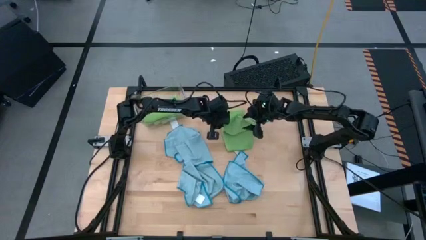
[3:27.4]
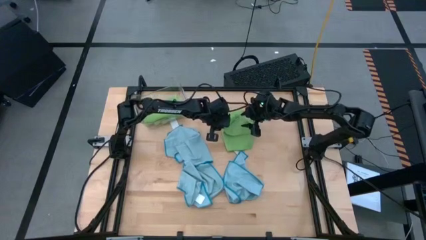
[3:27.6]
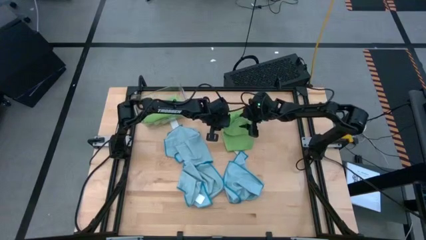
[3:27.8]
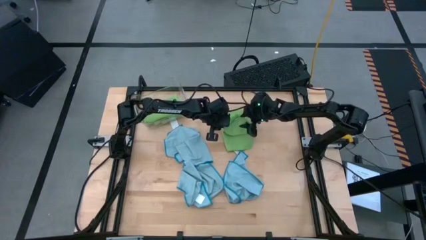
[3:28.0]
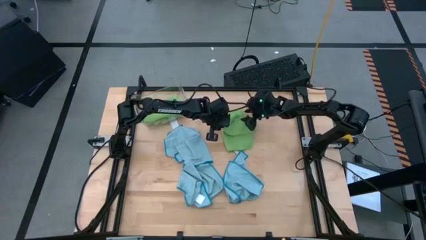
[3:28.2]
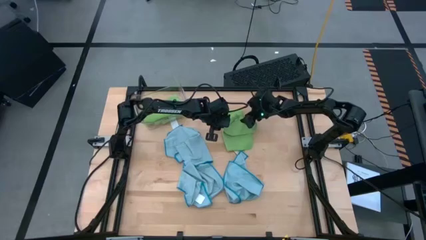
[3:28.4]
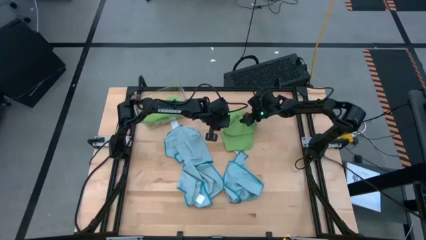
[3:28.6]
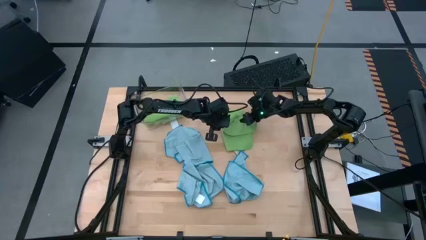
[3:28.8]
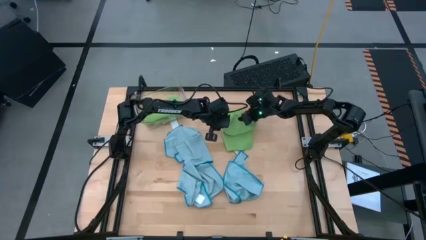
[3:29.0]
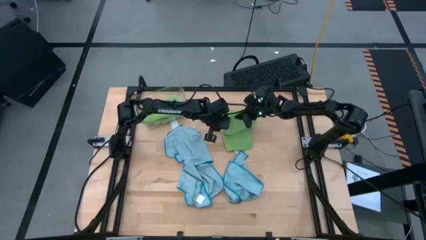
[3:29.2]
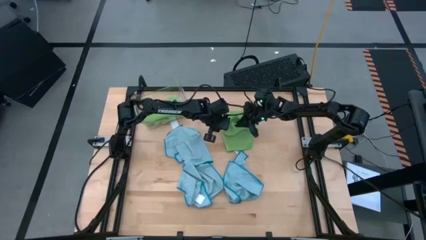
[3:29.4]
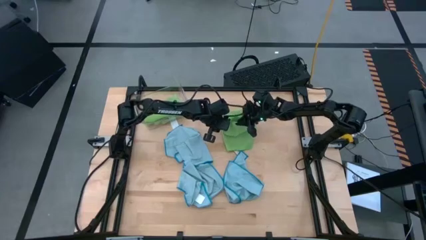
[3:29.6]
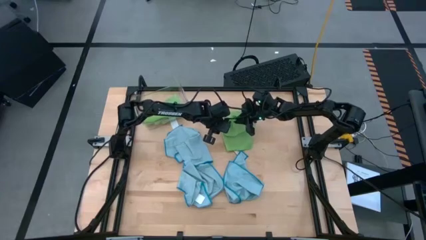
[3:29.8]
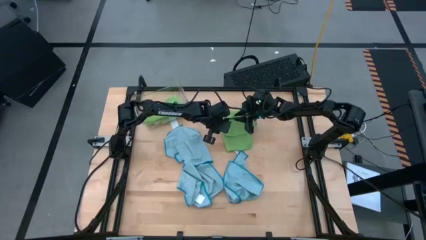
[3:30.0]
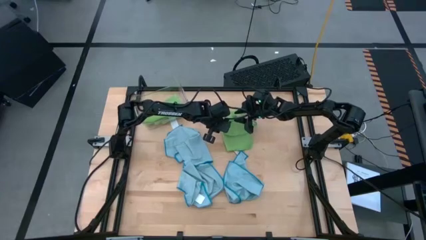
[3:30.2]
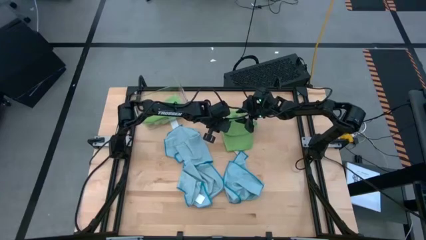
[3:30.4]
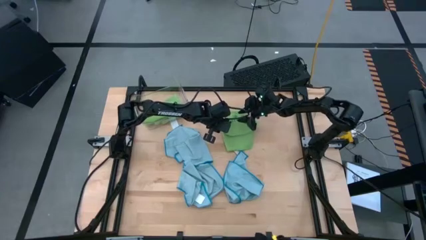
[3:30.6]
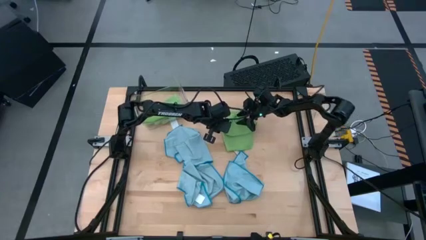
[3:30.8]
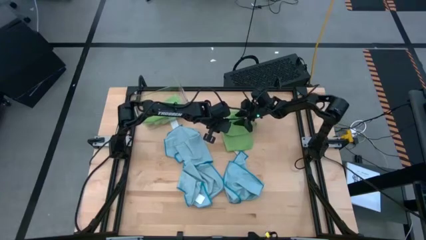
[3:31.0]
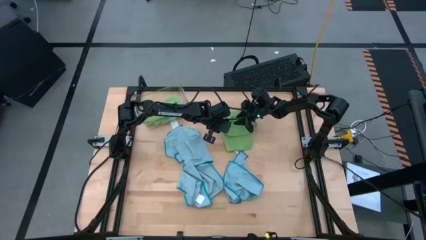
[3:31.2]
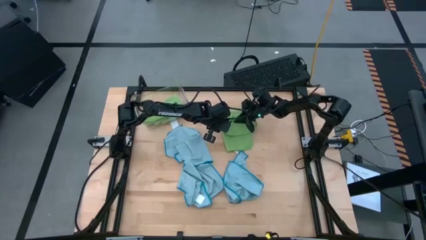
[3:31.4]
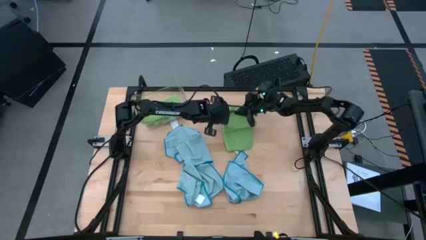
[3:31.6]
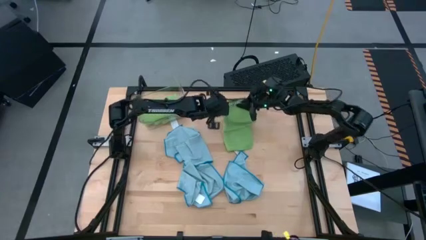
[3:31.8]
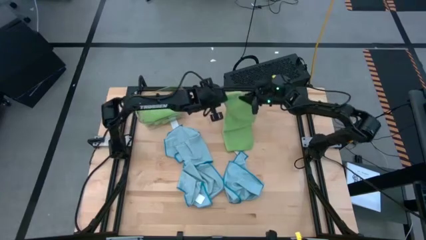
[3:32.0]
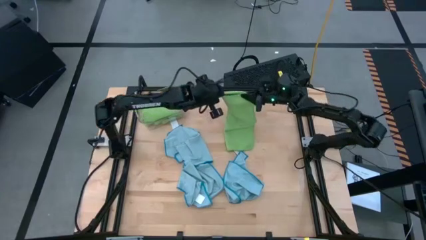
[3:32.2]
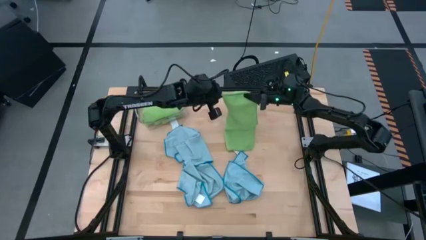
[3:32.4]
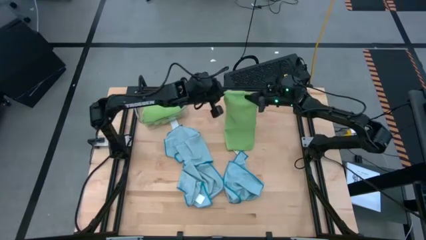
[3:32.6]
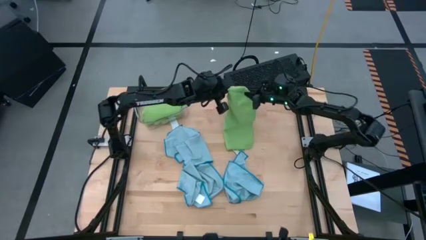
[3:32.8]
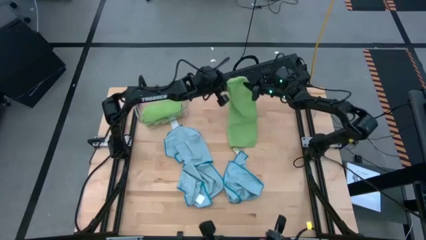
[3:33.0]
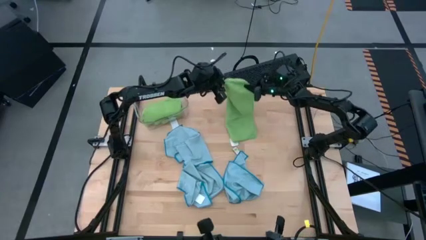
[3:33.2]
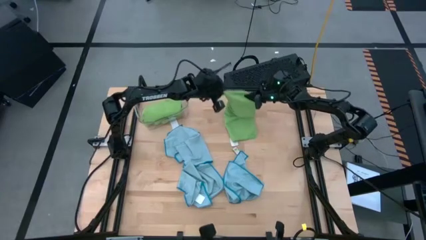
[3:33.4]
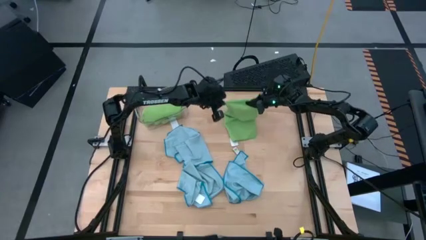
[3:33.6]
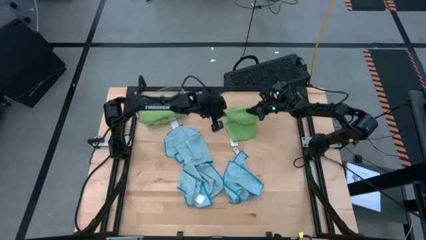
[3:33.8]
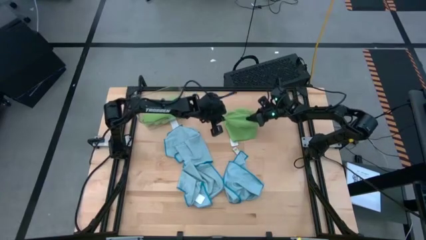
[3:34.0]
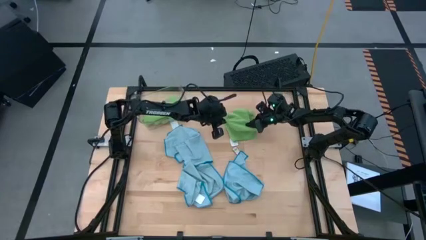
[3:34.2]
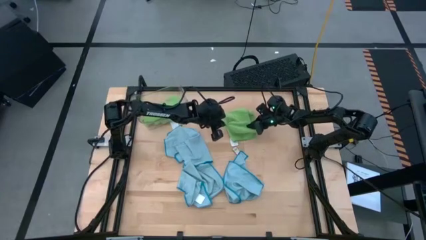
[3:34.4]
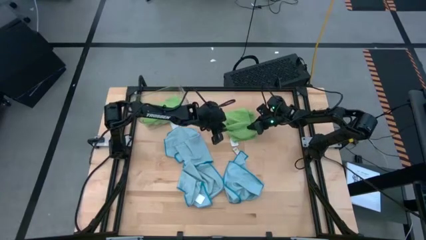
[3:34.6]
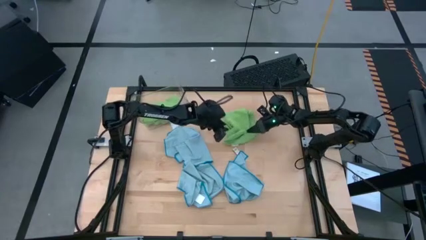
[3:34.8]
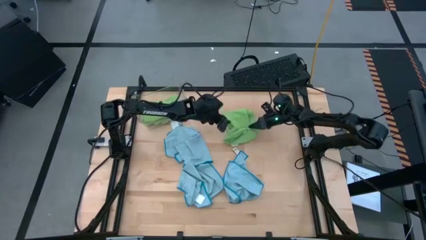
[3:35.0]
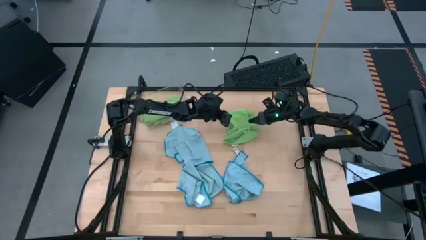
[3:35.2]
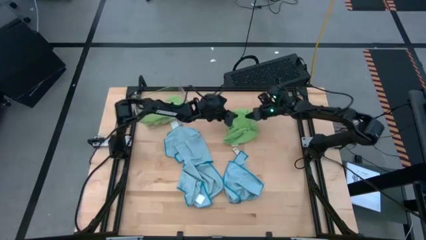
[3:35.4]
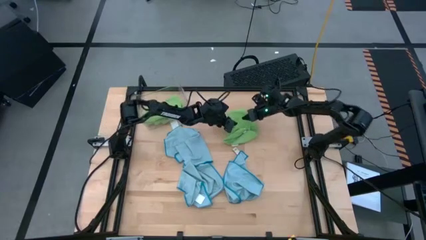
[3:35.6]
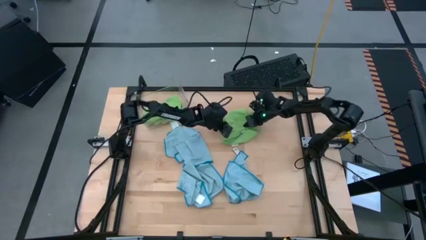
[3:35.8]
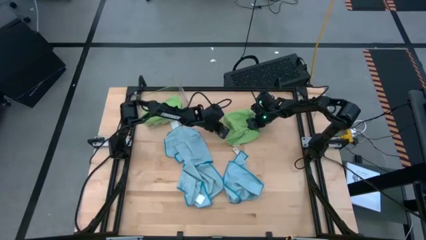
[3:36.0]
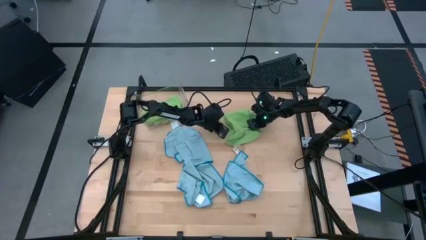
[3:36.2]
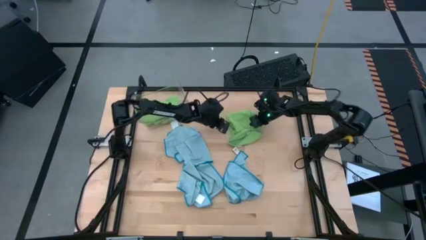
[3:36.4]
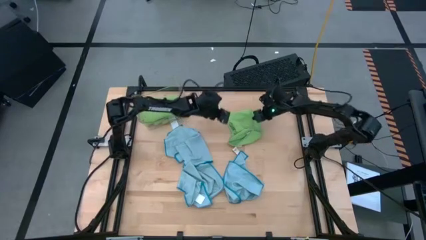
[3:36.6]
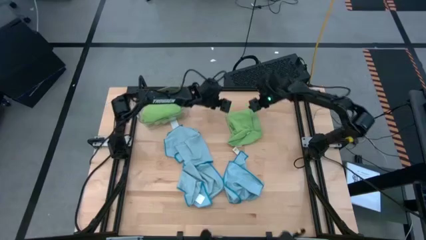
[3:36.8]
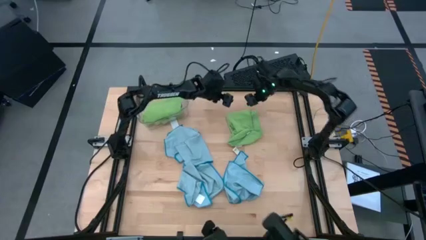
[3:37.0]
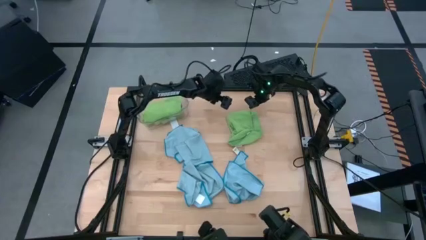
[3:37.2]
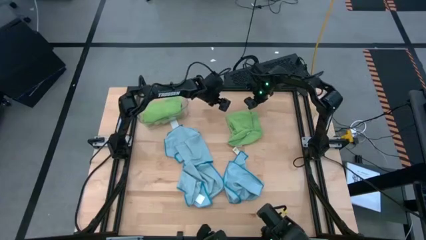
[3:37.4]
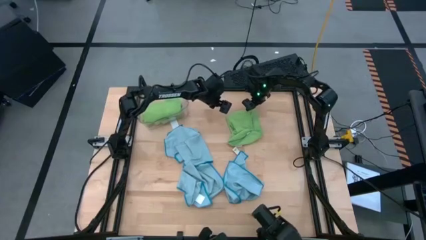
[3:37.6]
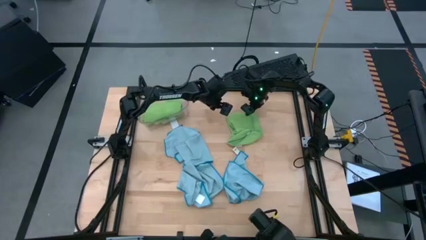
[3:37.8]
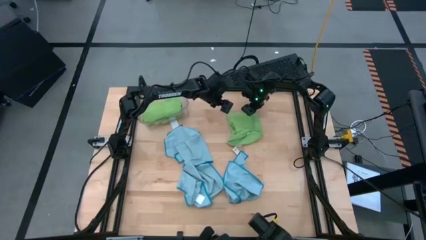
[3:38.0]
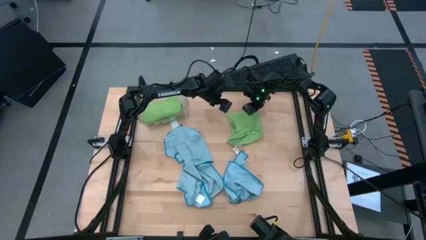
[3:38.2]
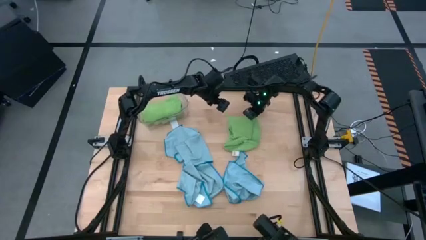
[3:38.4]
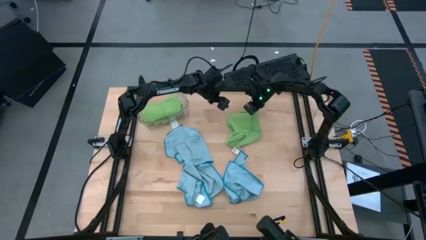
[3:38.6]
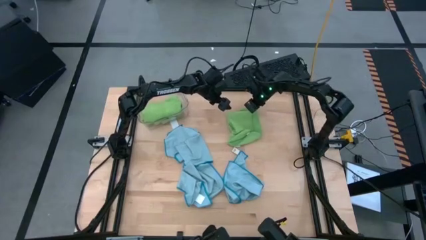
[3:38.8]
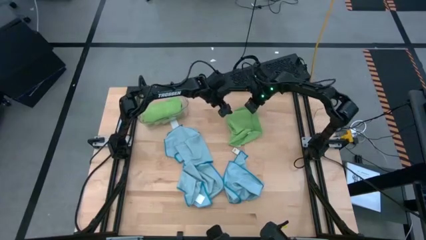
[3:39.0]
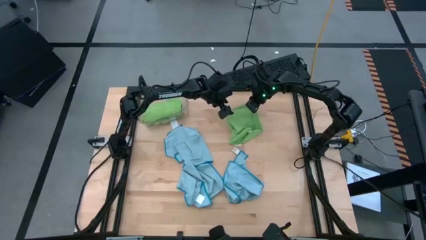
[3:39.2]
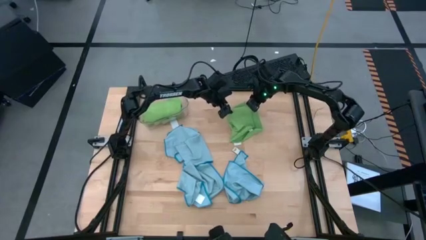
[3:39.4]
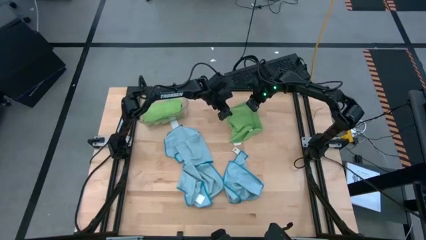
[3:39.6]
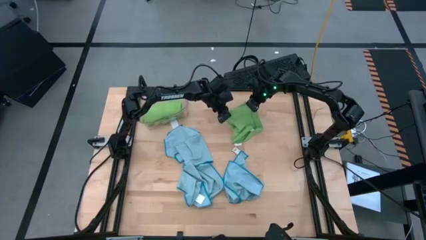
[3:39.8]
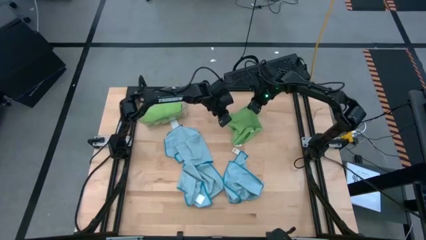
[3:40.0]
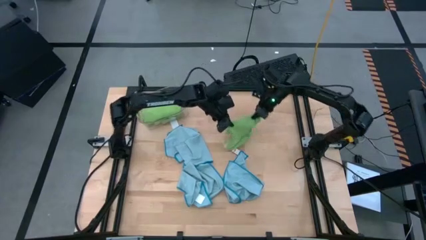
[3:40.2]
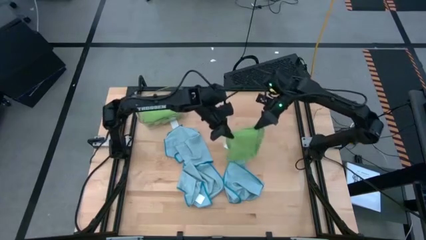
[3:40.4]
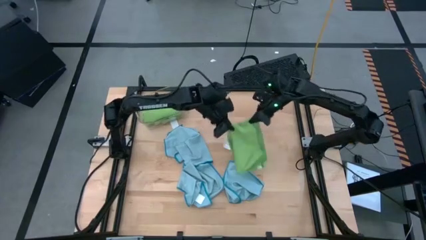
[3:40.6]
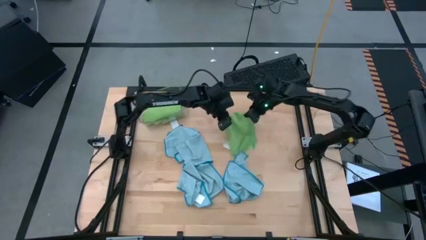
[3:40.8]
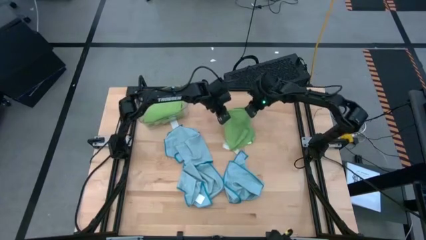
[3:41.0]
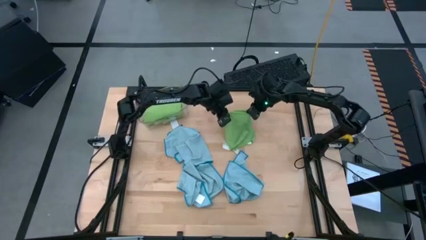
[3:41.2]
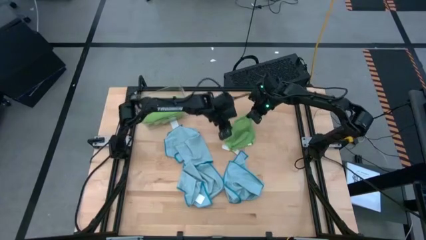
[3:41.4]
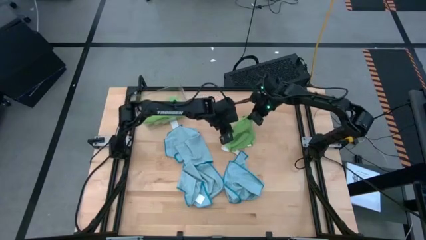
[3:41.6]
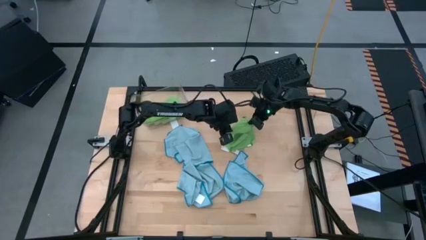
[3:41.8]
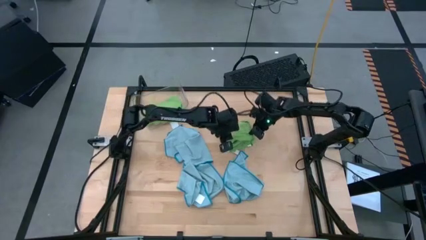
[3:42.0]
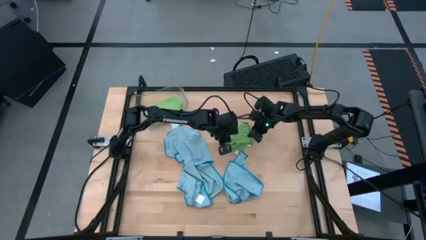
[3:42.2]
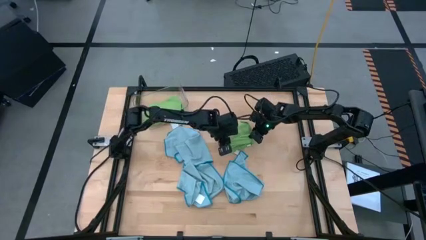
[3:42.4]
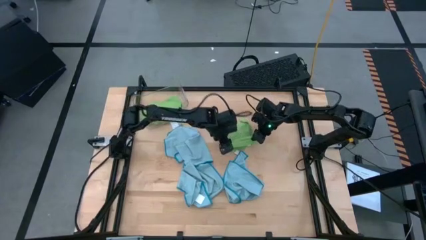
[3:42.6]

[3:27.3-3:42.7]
Task: Fold microfiber towels
Fold the green microfiber cloth
